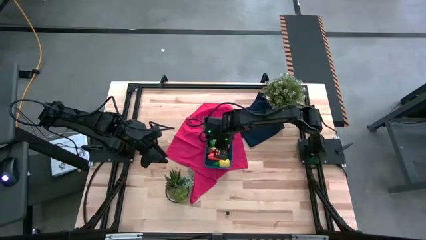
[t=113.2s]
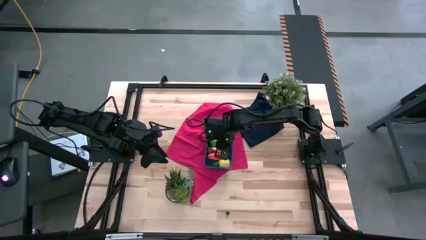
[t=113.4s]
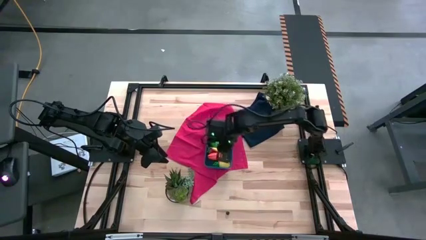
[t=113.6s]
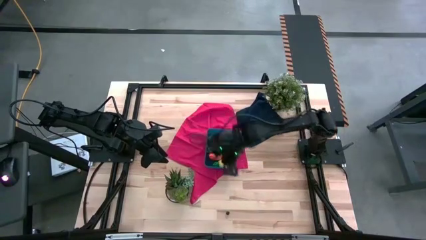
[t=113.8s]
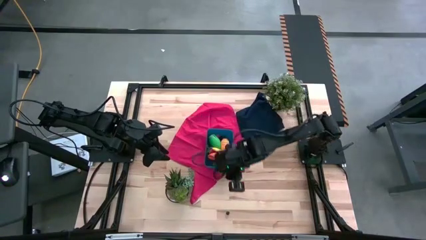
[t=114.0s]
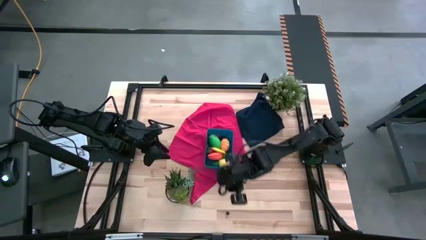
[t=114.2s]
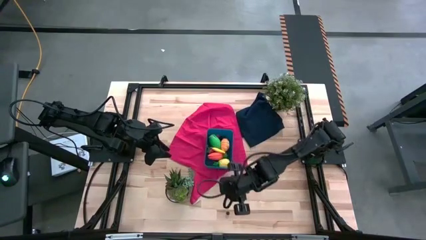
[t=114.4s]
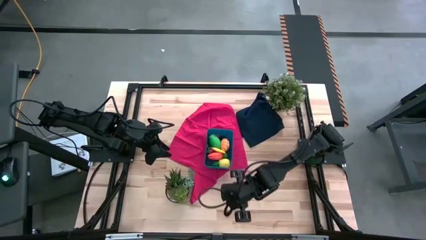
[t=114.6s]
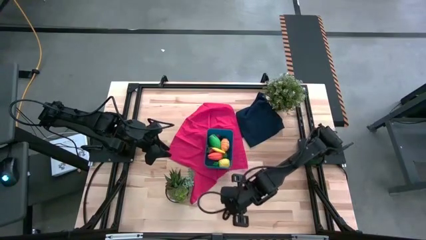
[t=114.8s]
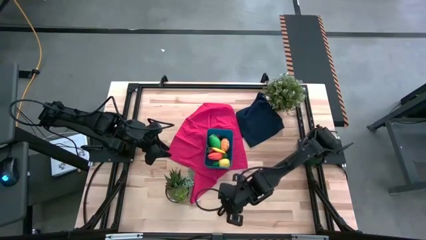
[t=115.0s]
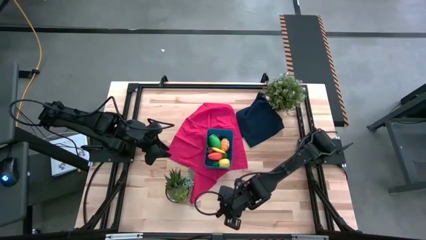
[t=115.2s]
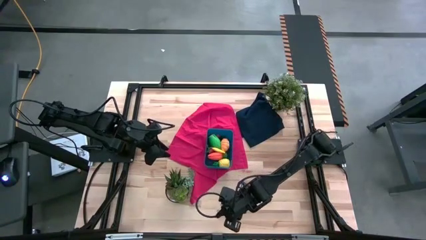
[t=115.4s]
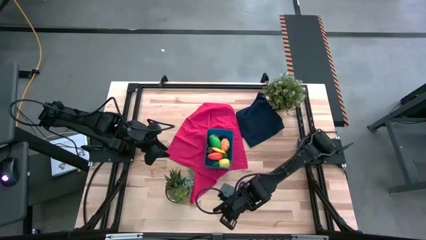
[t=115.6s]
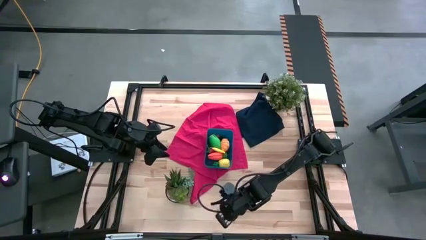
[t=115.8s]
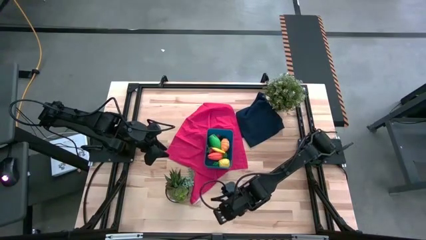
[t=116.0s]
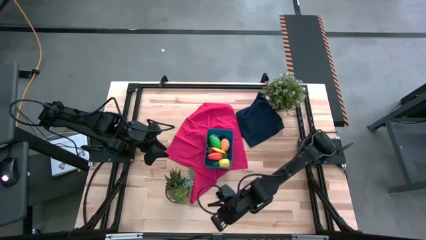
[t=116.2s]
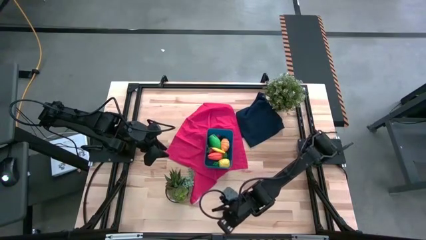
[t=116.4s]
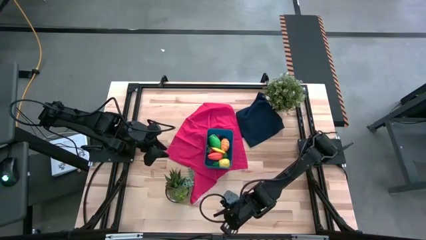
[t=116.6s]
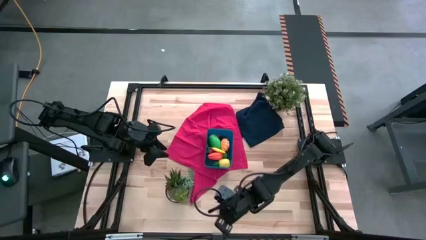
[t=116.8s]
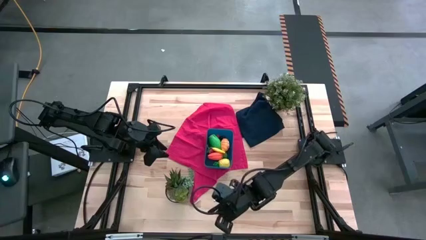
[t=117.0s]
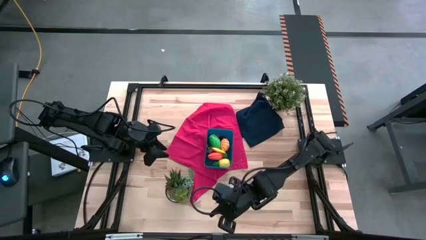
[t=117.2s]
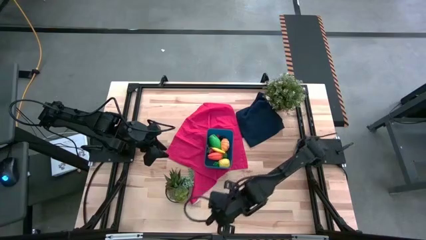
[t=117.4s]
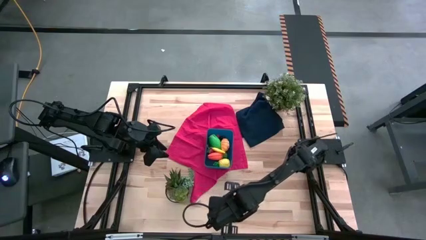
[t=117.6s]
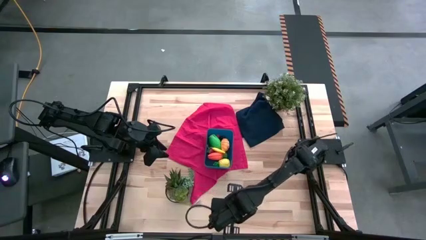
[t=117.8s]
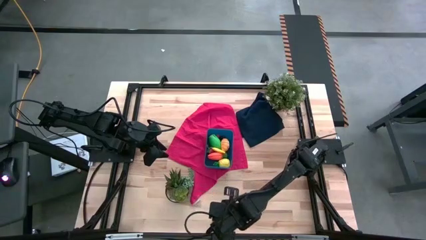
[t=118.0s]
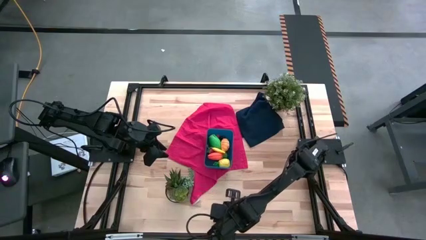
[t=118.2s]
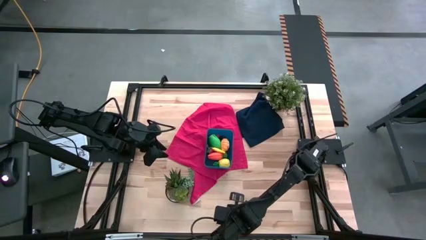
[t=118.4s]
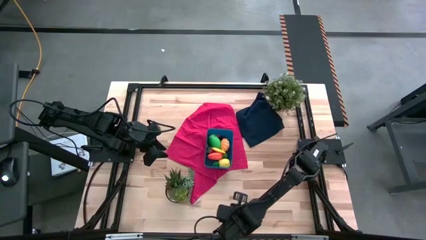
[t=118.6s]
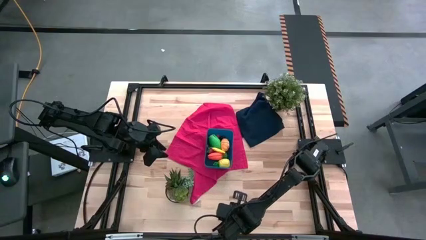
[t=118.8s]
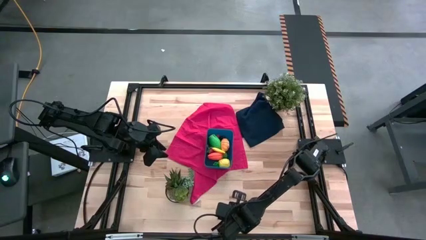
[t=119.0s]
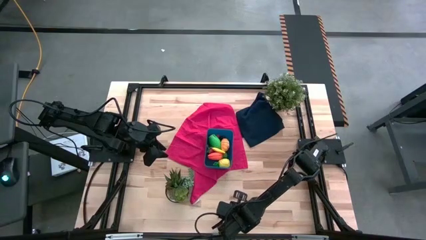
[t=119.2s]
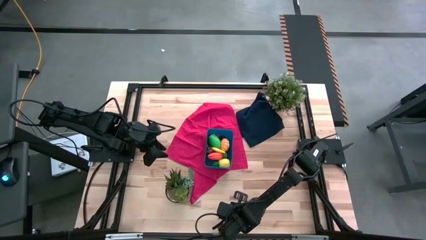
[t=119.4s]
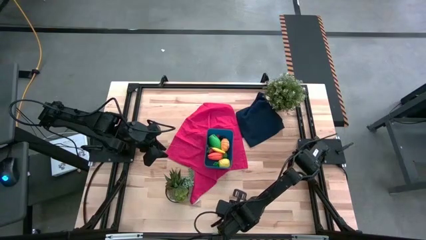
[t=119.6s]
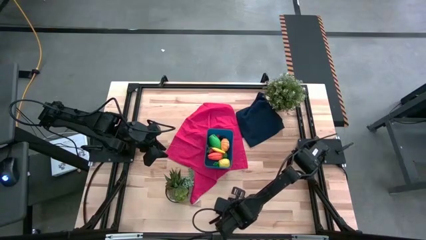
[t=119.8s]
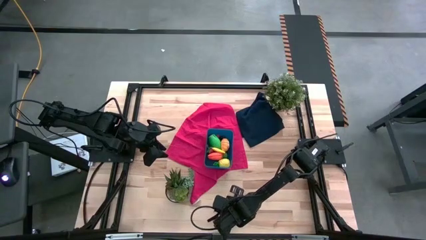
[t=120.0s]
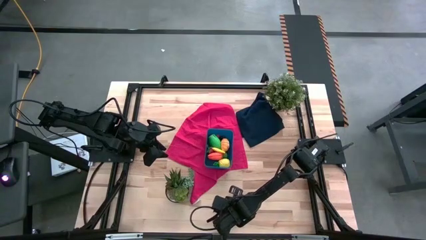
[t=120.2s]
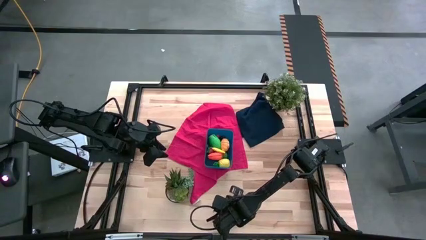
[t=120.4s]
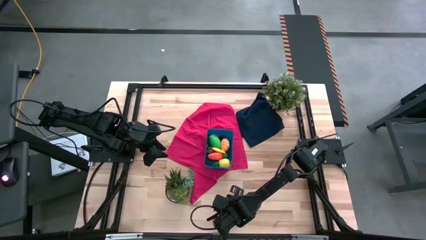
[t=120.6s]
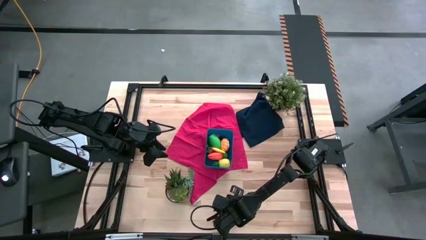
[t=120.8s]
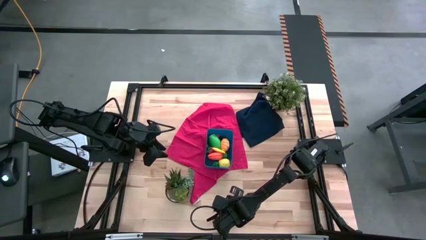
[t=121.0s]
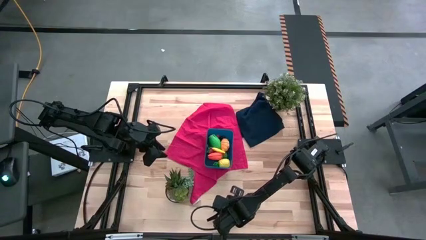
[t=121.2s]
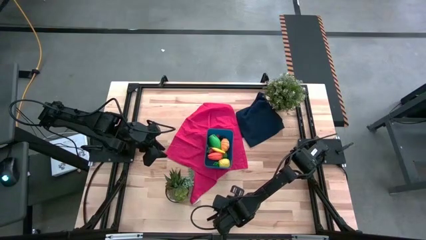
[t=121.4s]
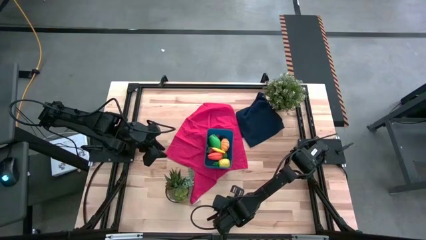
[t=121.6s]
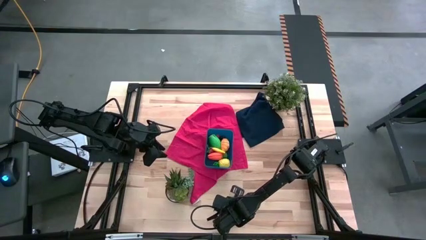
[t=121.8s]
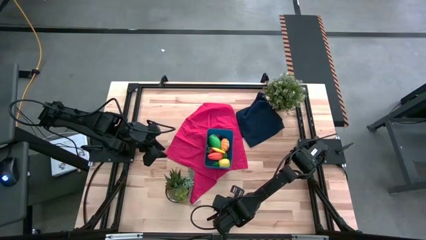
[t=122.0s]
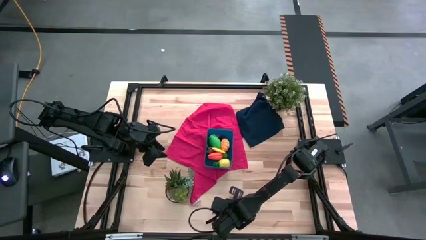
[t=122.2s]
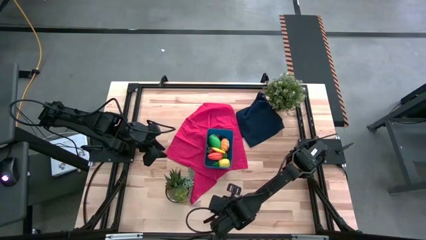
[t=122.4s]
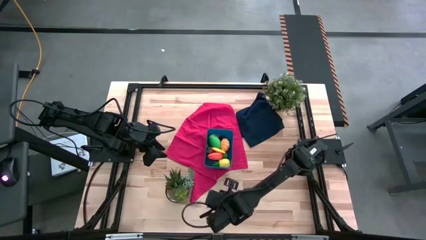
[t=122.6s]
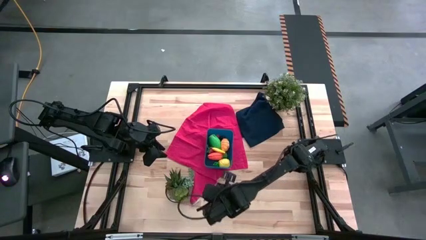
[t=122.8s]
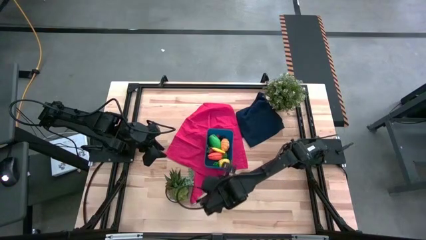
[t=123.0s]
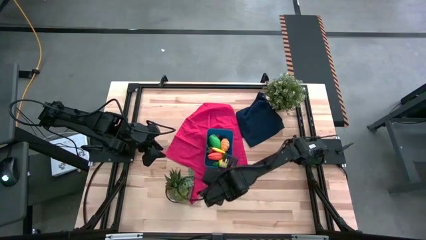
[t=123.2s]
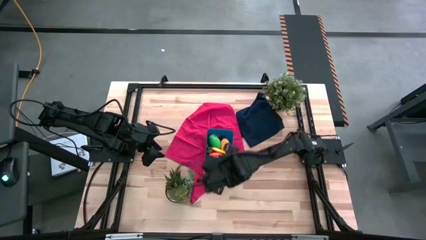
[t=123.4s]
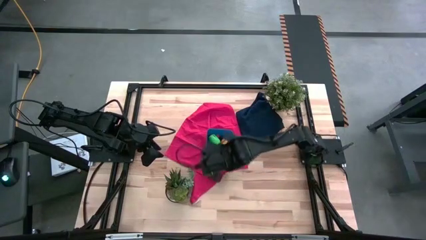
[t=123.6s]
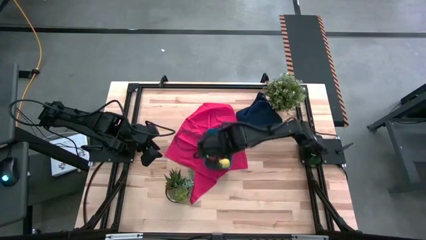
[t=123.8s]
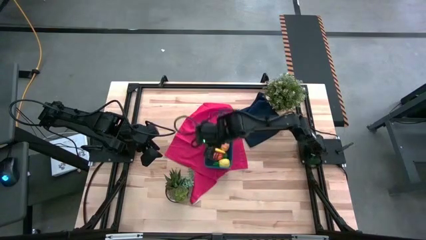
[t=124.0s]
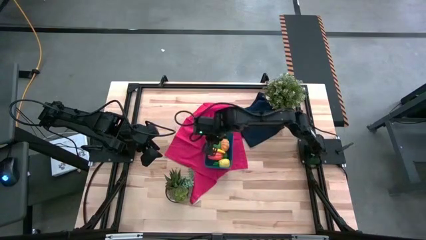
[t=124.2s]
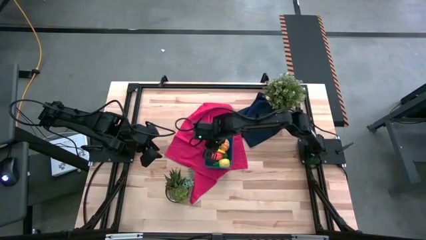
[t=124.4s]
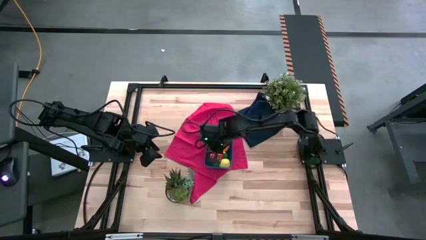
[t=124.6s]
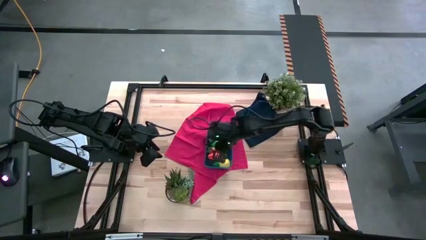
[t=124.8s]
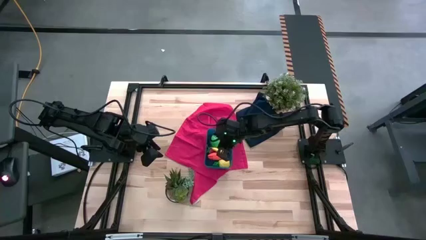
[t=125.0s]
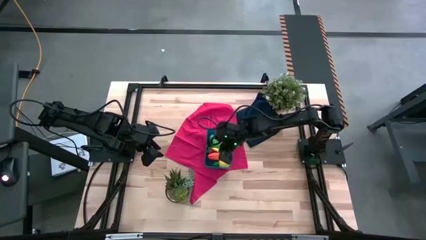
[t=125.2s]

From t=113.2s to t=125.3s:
Task: Pick and placing Produce into tupperware
Put the blueberry into the blue bin

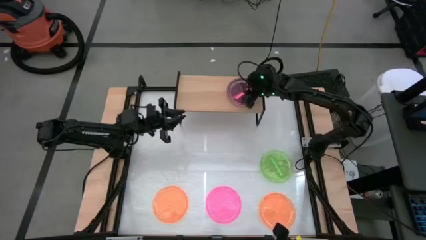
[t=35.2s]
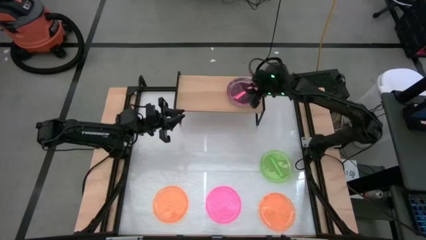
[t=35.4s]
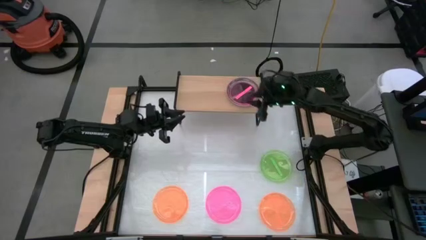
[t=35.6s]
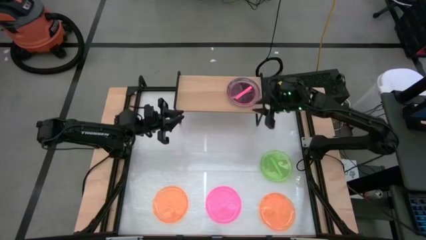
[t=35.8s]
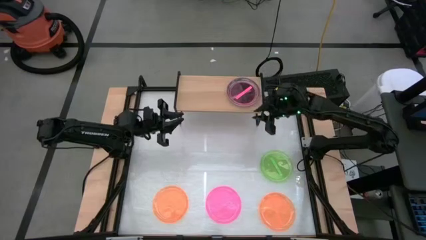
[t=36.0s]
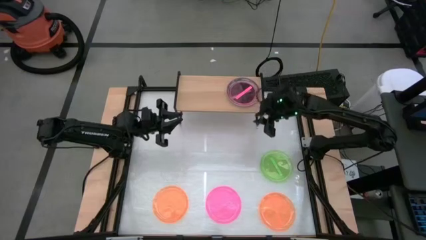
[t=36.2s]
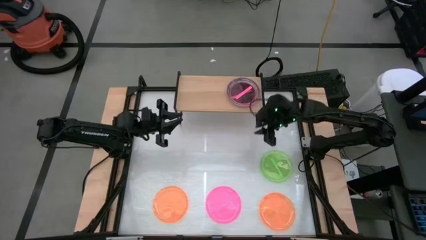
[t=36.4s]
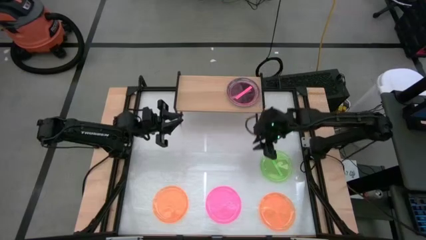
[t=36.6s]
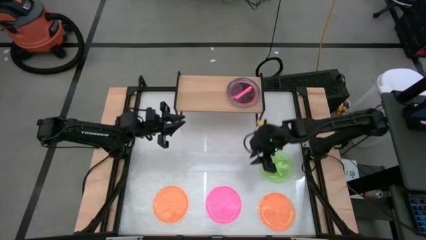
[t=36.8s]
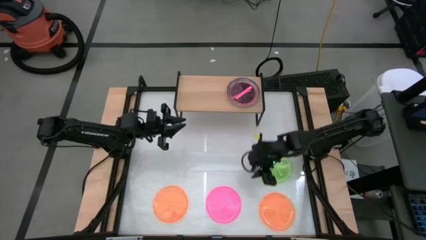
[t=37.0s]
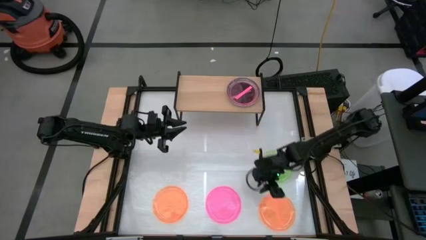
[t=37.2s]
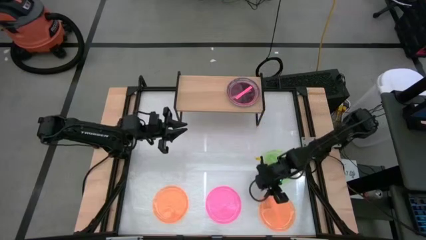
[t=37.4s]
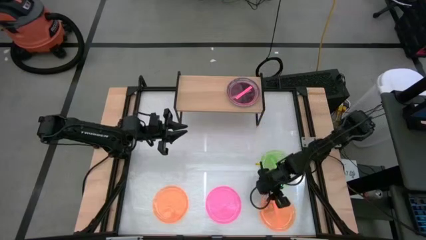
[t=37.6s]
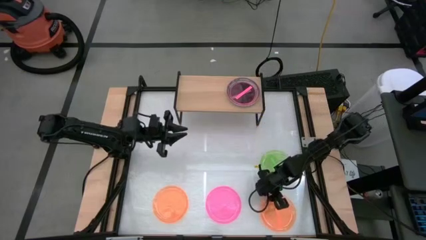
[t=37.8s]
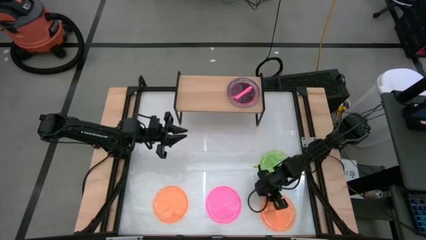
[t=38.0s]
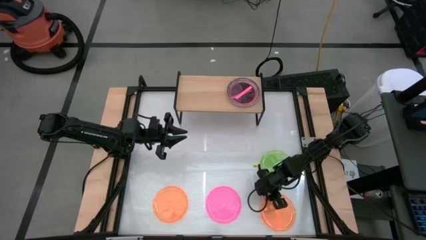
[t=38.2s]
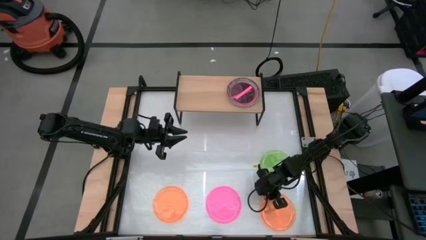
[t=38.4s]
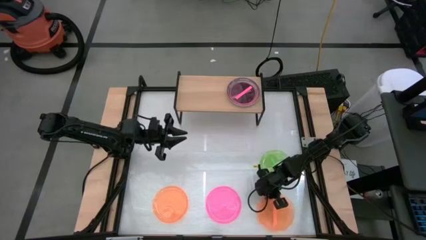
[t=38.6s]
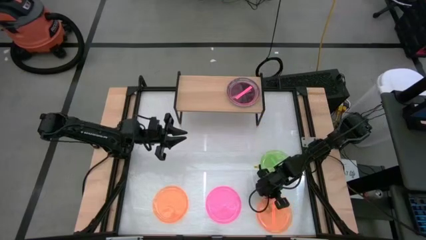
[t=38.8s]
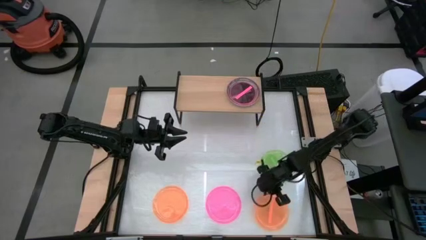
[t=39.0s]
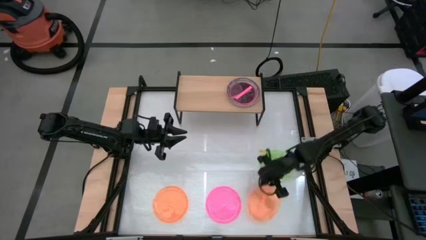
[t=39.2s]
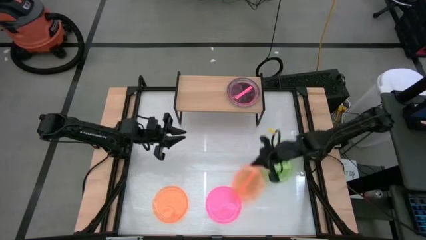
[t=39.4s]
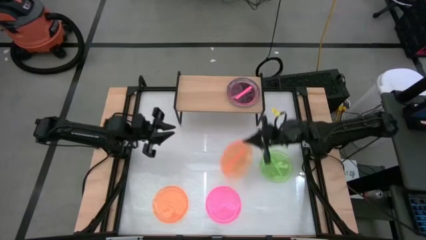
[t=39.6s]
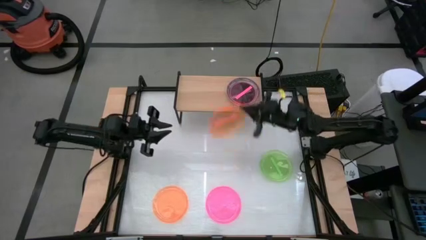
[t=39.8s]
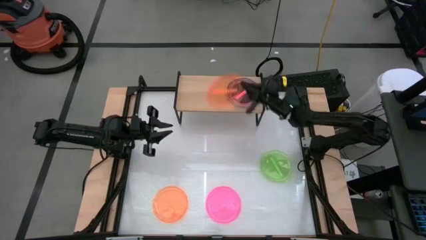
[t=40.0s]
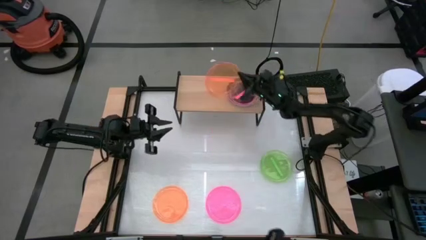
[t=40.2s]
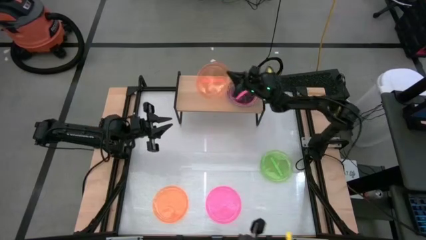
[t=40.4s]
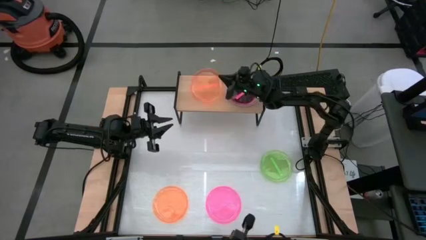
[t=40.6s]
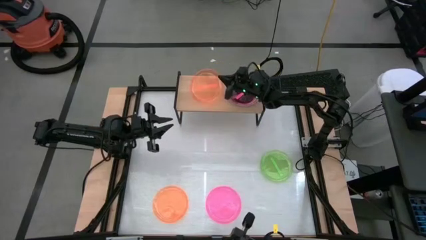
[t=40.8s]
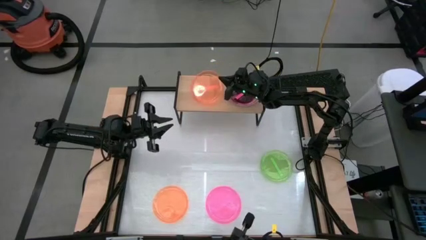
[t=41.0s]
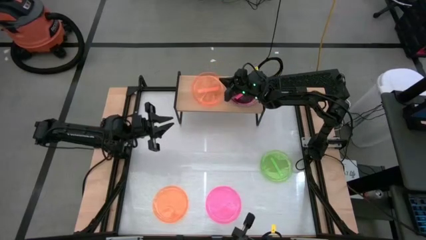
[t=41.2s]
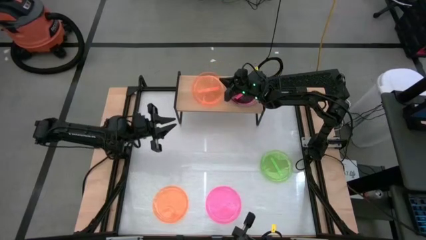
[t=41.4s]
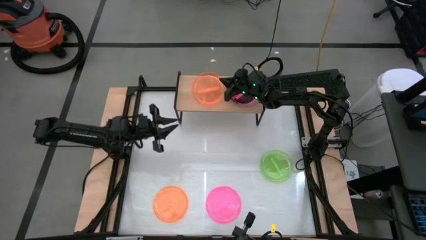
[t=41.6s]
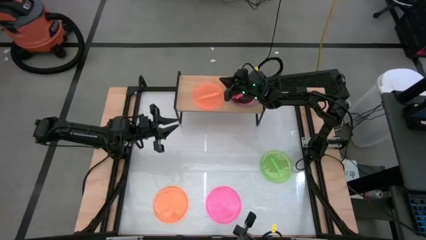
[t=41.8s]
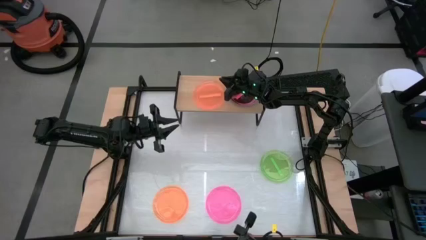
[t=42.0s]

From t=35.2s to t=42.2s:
Task: Place and stack plates onto a shelf
Put the right orange plate on the shelf
